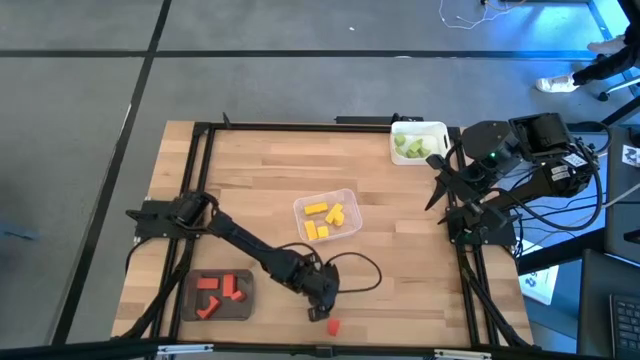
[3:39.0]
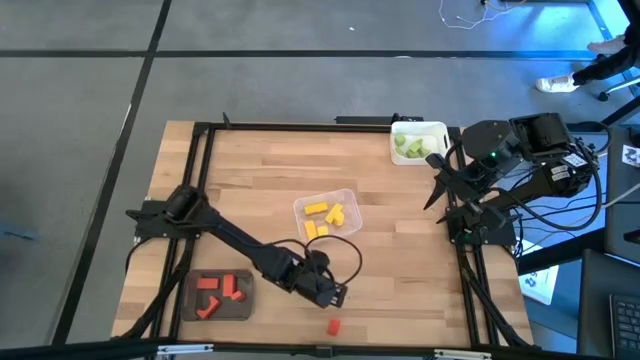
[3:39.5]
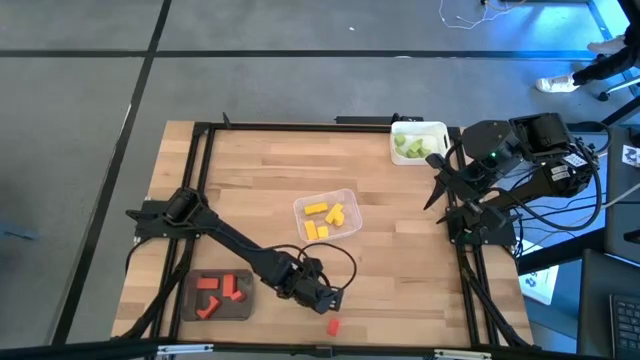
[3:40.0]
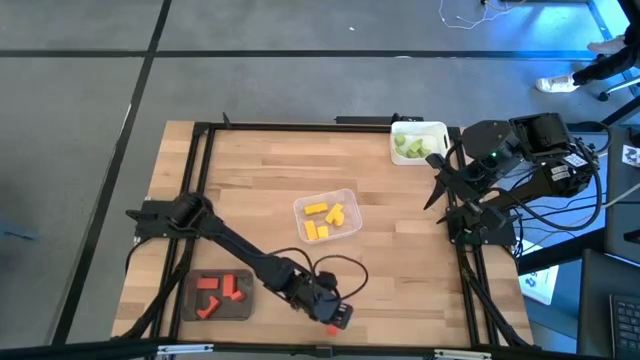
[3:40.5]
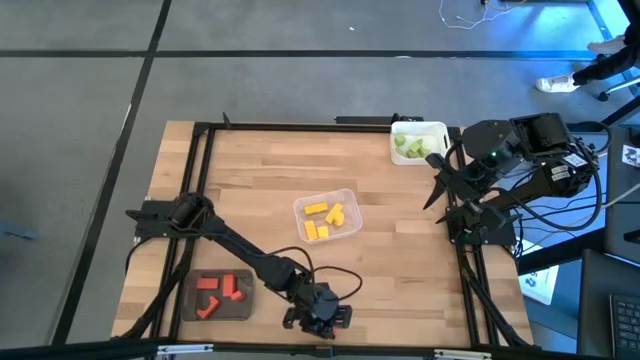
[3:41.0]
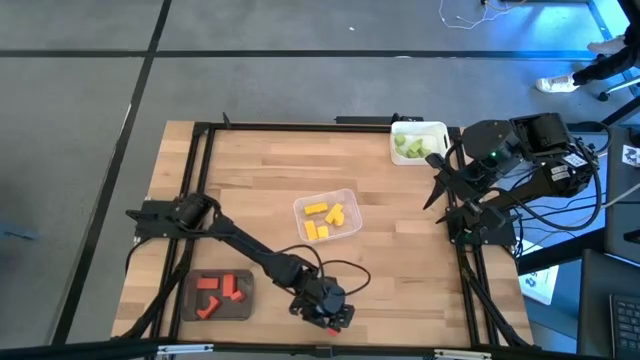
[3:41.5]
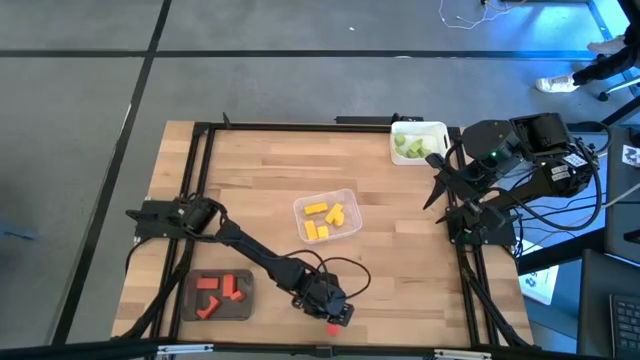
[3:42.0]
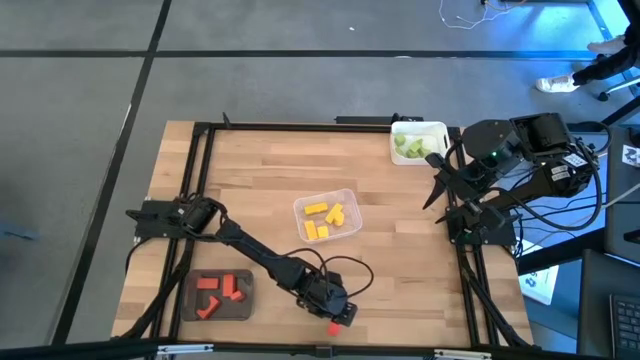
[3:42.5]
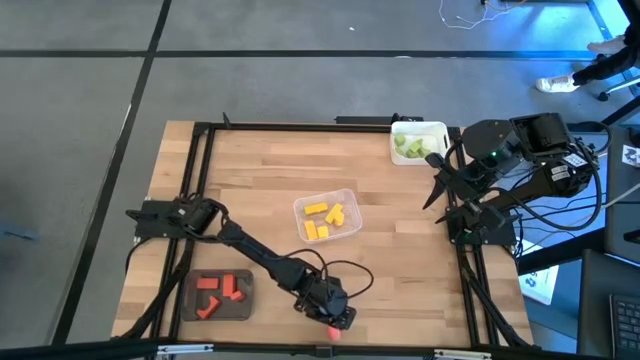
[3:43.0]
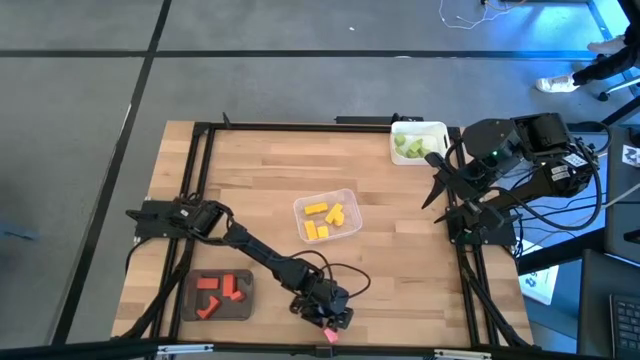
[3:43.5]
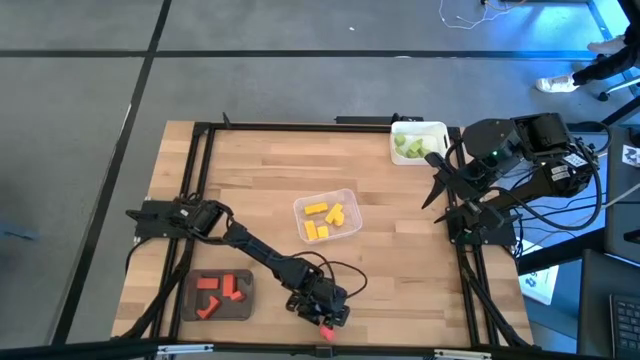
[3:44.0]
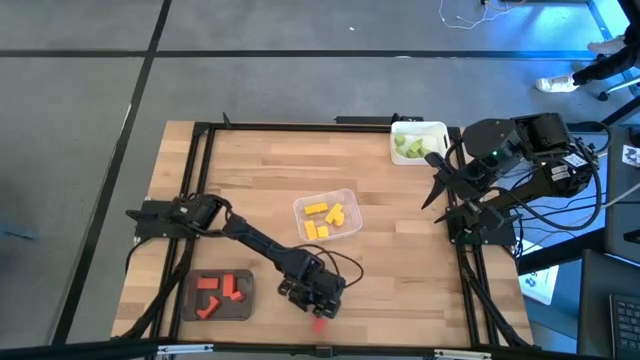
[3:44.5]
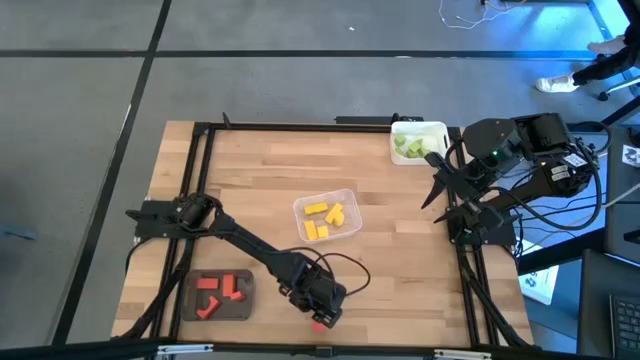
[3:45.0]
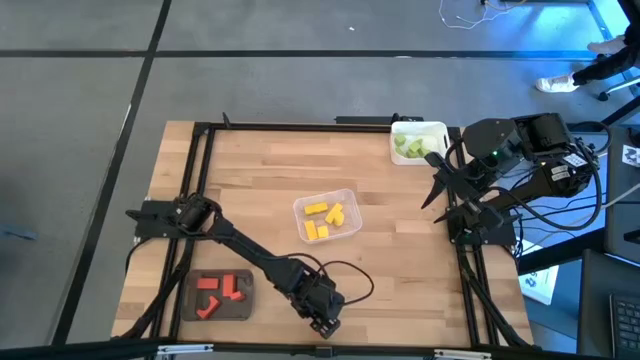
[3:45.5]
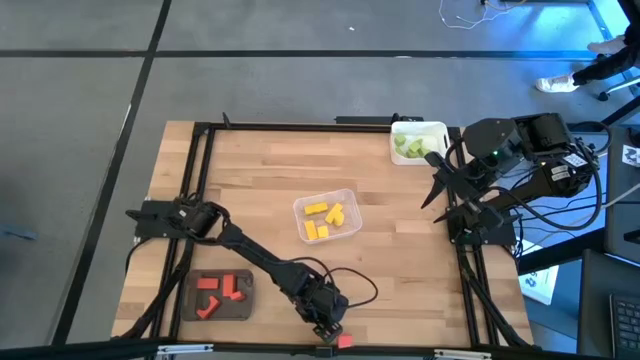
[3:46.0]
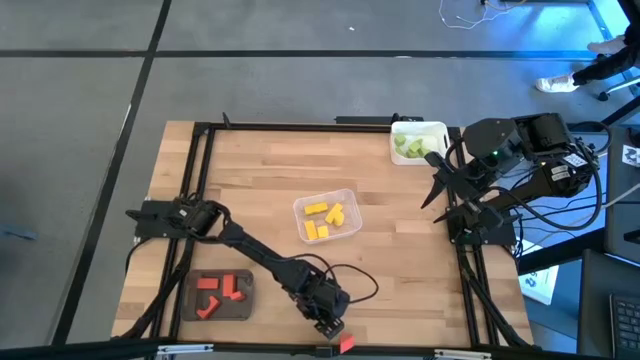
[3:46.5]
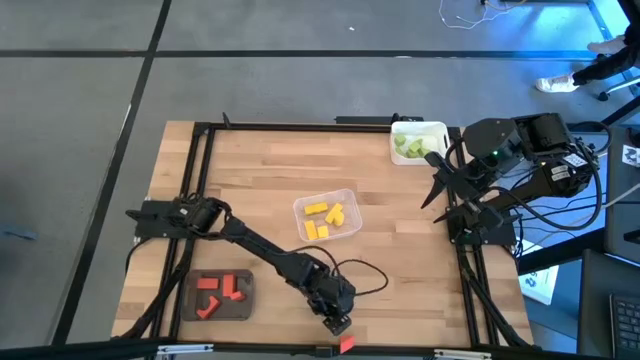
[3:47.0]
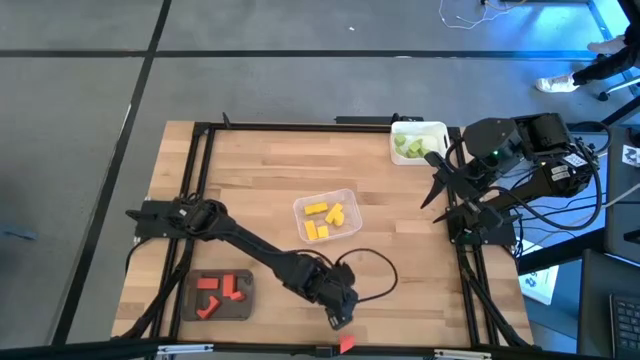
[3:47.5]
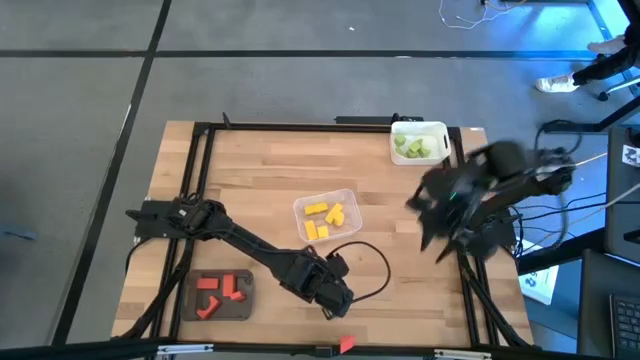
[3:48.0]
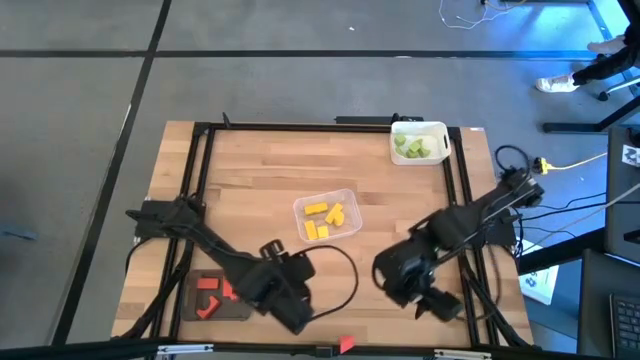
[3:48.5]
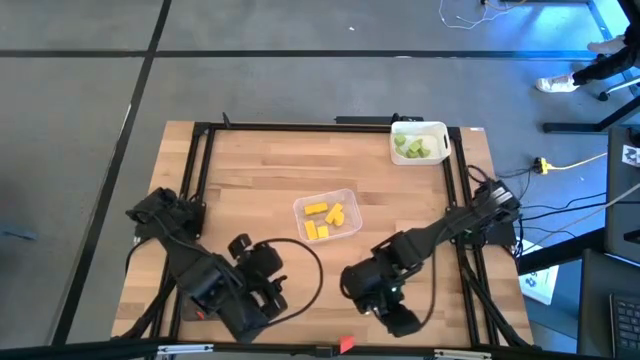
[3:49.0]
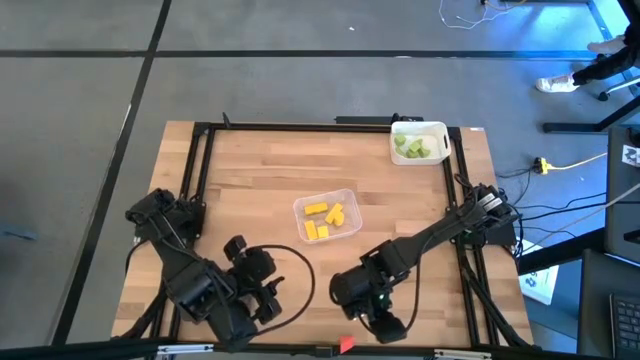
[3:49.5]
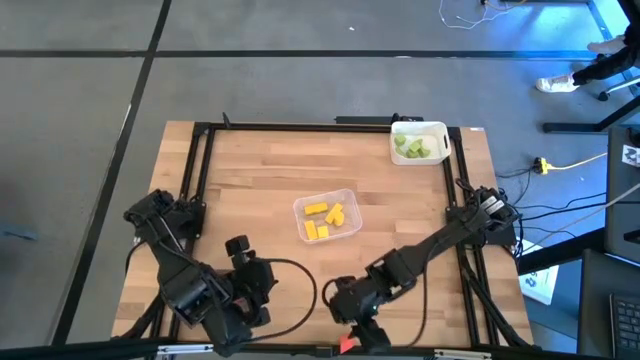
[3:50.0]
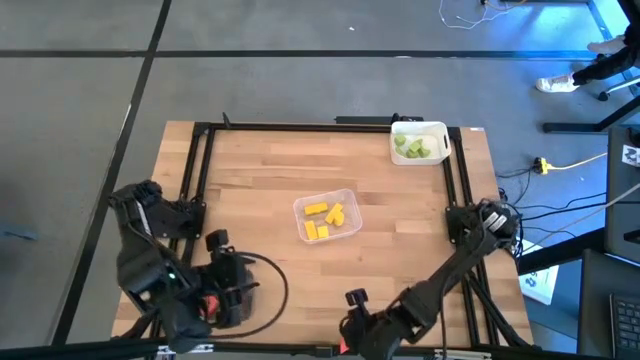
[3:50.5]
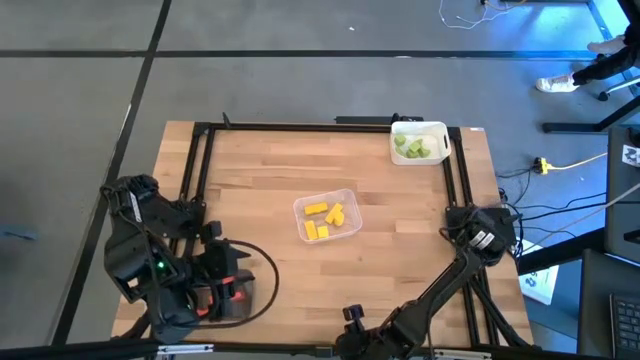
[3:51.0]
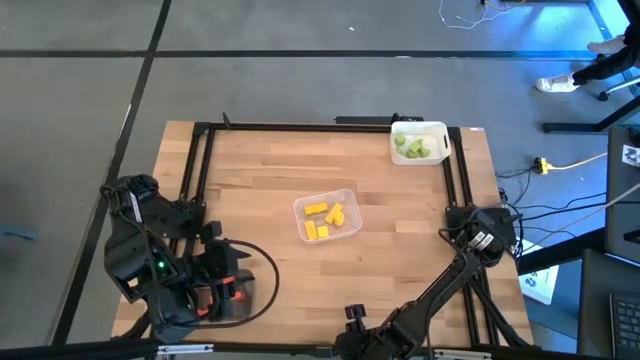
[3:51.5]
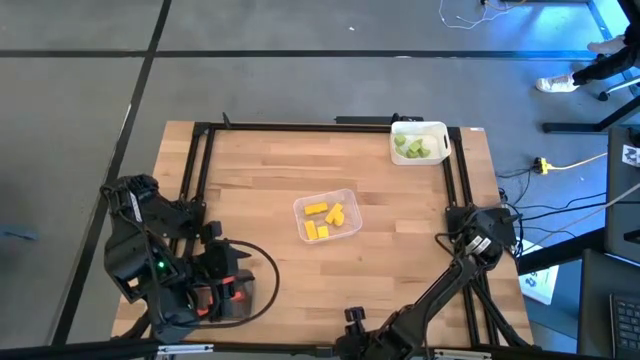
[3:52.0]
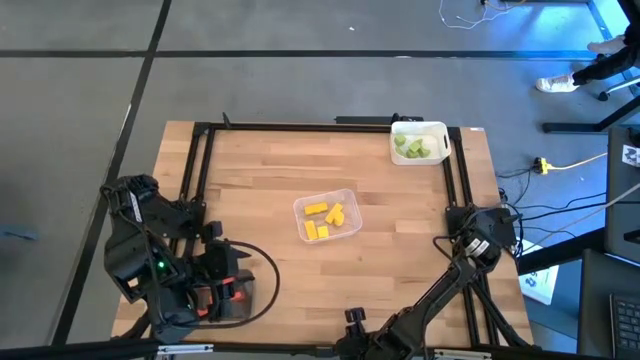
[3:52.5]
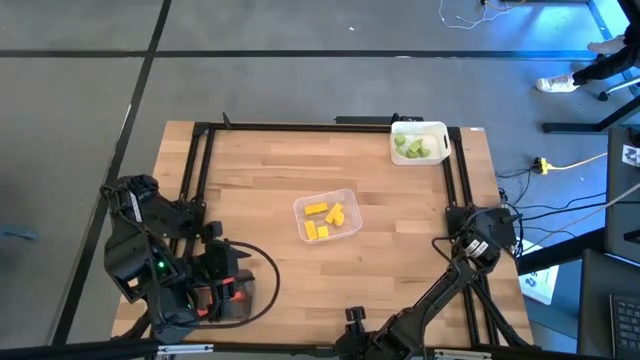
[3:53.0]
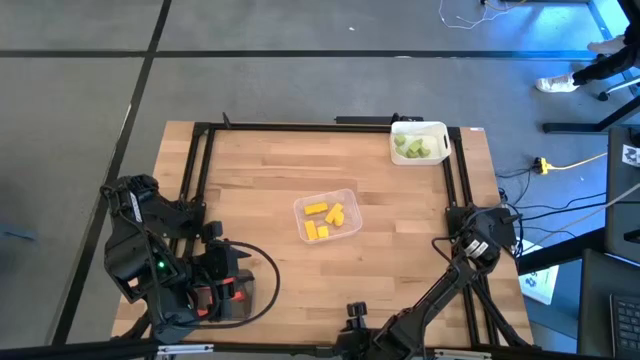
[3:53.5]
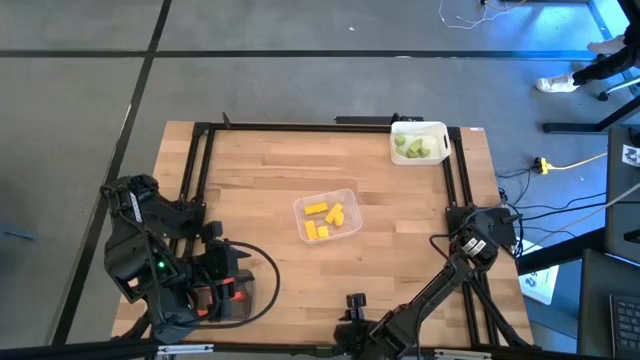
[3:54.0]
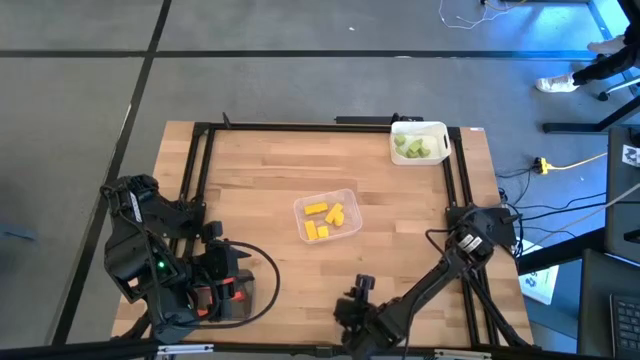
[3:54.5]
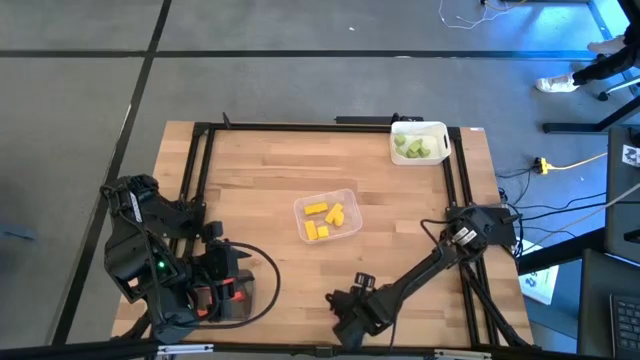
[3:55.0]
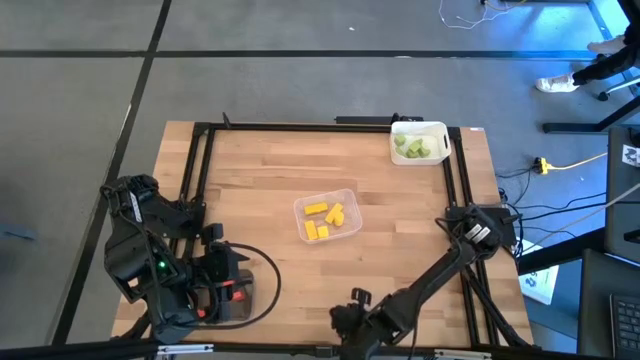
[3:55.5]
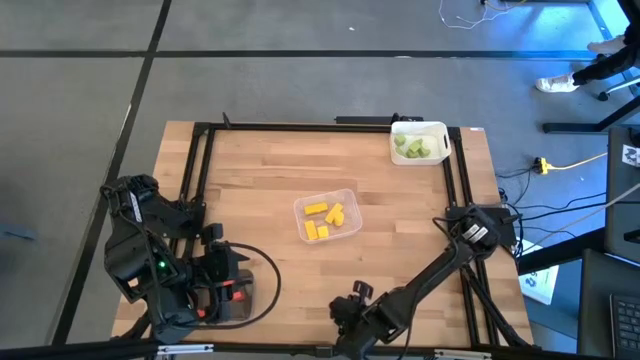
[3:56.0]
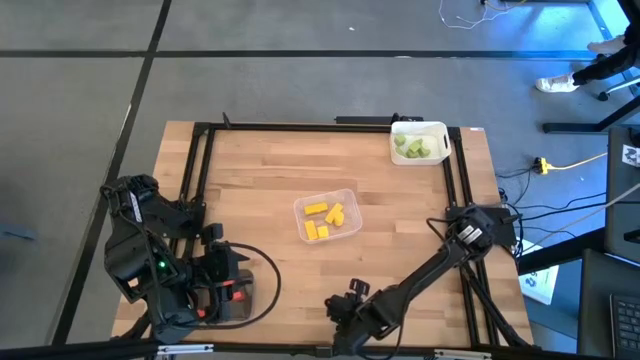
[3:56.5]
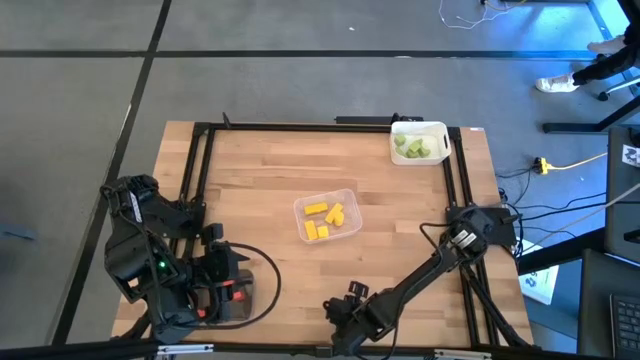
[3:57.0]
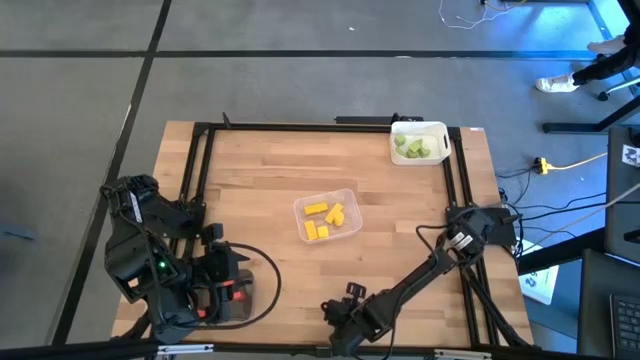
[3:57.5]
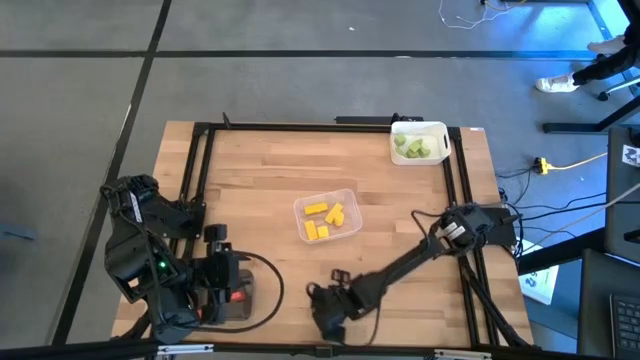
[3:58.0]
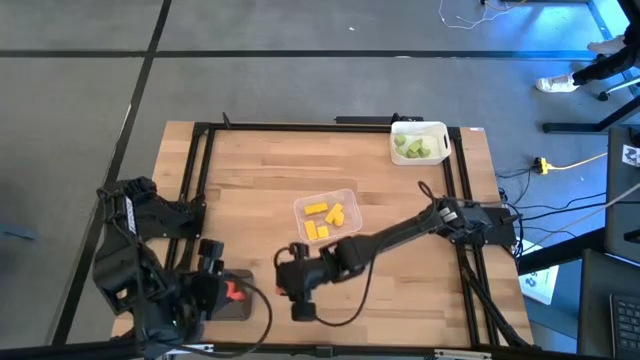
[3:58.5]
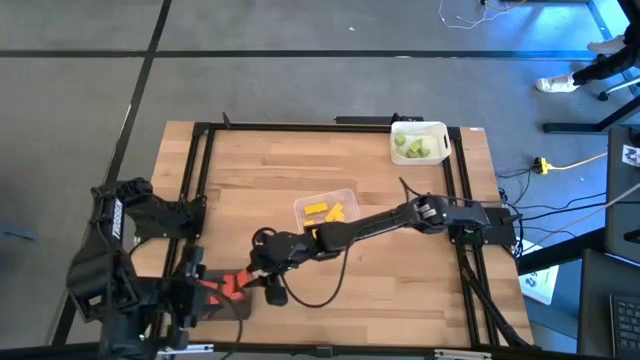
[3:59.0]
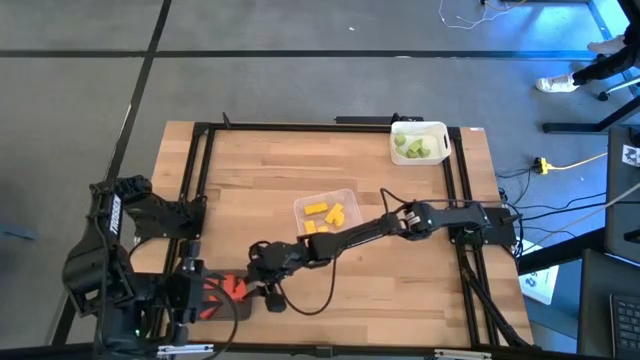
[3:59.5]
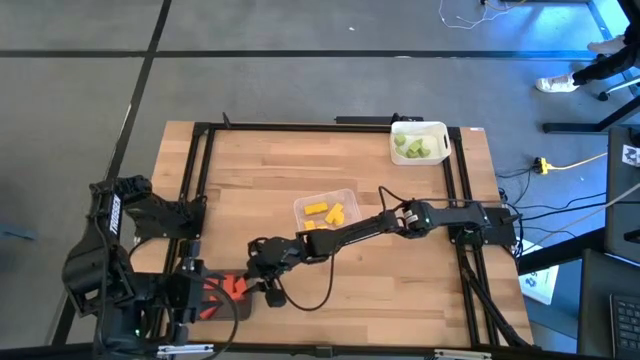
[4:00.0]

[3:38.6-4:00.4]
Task: Sort & place blocks by color
Put the orange block into the black bin
